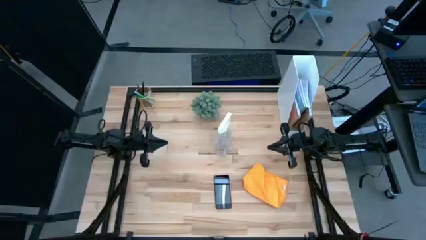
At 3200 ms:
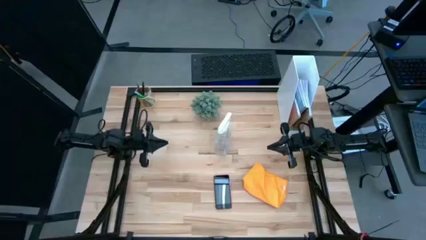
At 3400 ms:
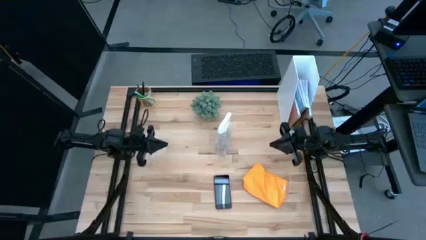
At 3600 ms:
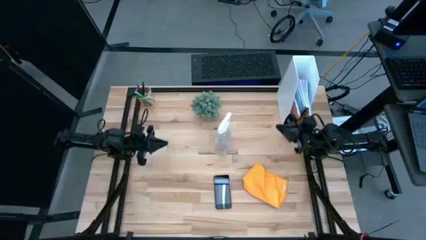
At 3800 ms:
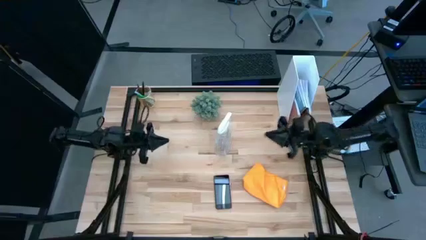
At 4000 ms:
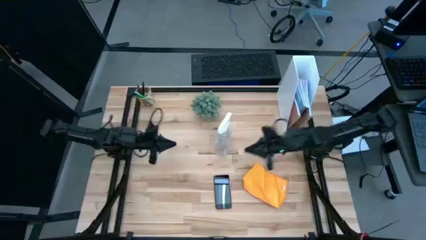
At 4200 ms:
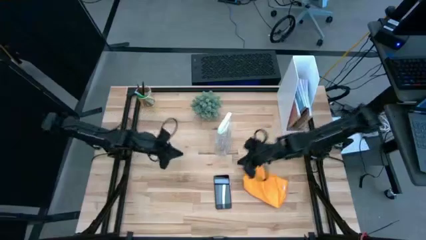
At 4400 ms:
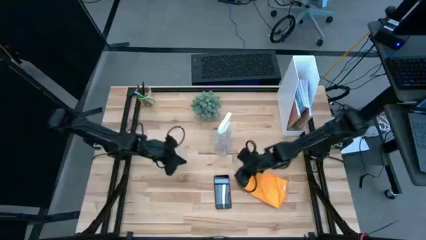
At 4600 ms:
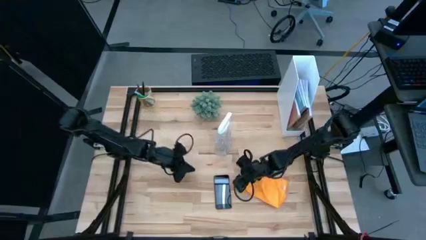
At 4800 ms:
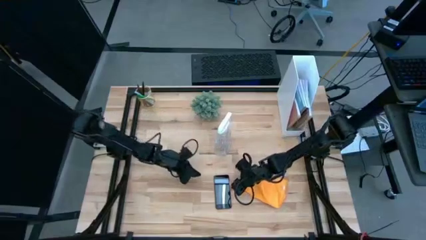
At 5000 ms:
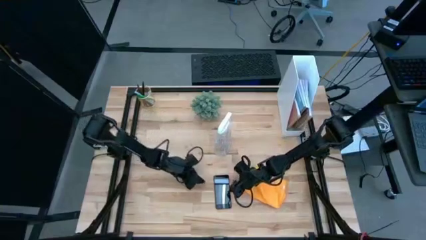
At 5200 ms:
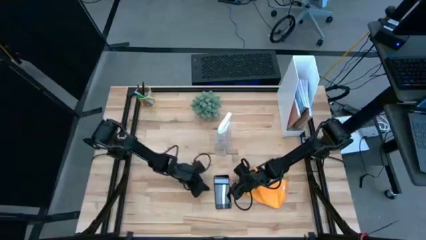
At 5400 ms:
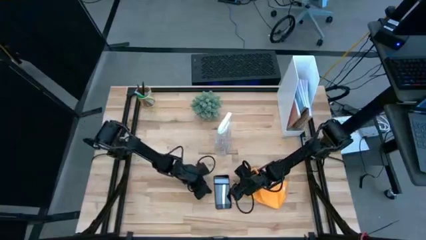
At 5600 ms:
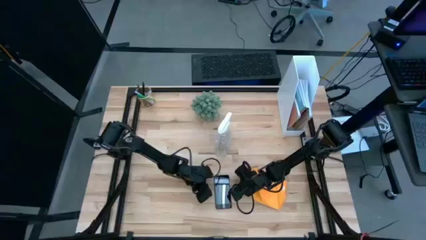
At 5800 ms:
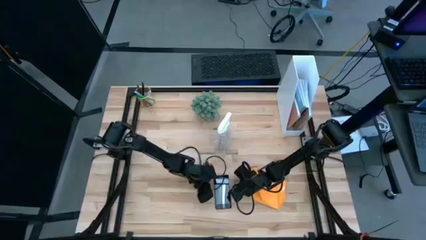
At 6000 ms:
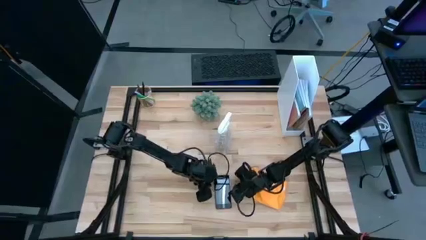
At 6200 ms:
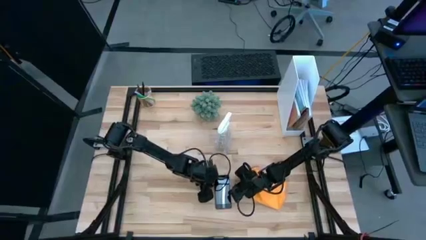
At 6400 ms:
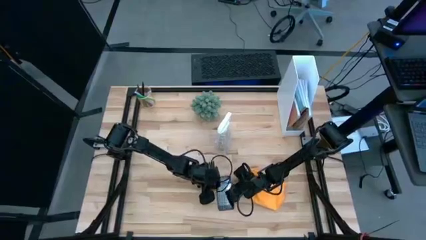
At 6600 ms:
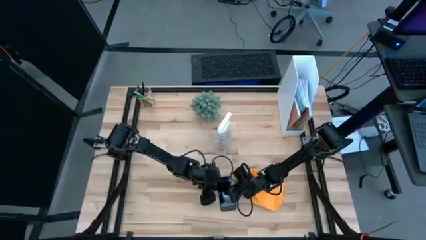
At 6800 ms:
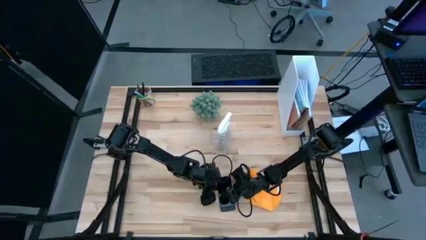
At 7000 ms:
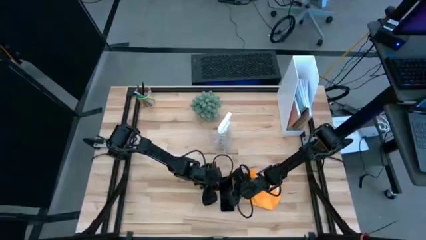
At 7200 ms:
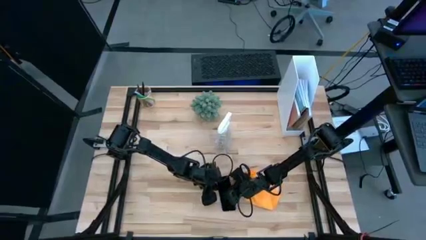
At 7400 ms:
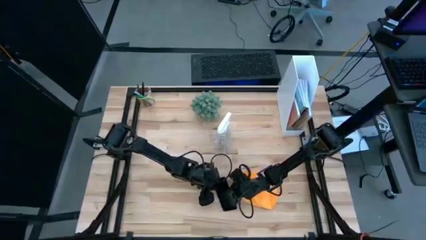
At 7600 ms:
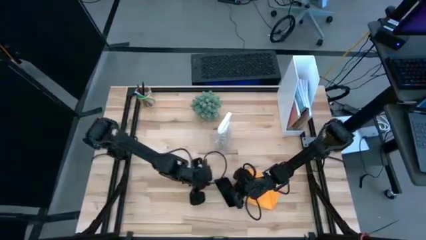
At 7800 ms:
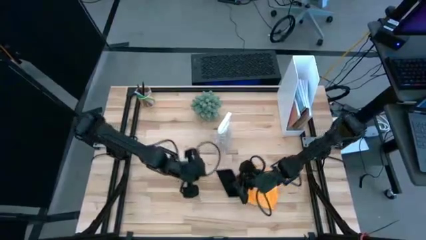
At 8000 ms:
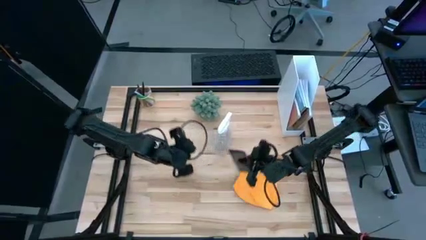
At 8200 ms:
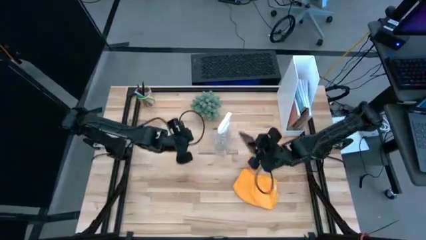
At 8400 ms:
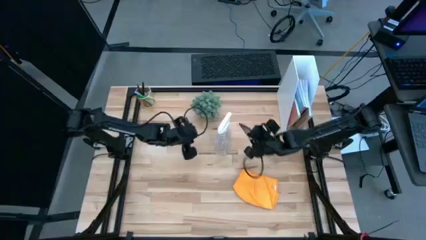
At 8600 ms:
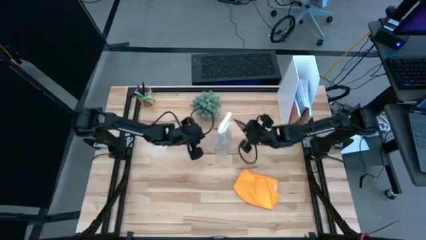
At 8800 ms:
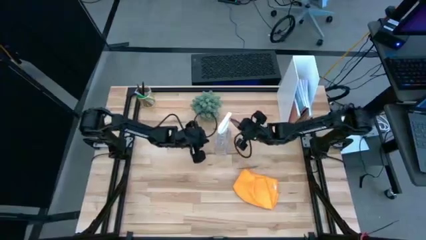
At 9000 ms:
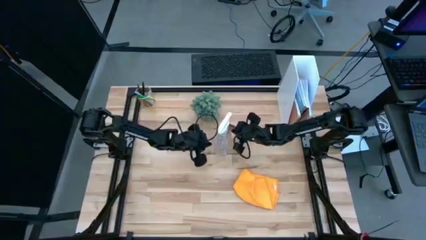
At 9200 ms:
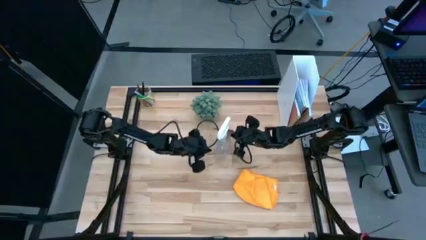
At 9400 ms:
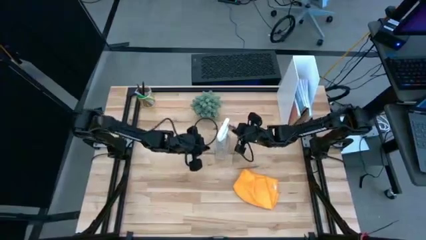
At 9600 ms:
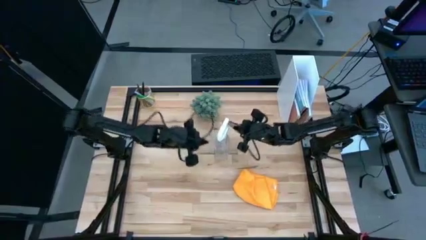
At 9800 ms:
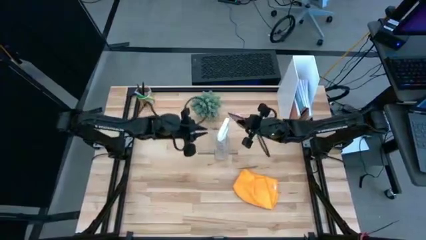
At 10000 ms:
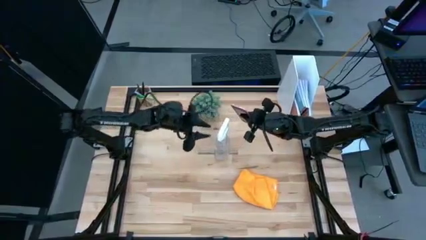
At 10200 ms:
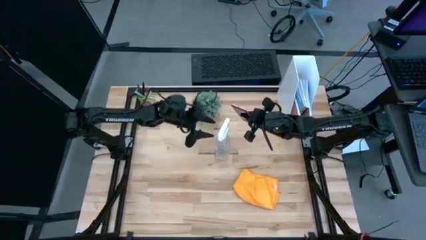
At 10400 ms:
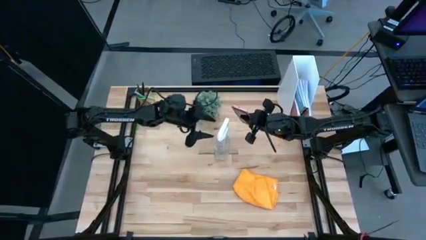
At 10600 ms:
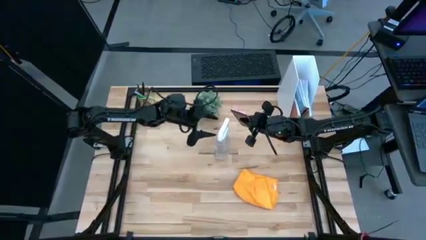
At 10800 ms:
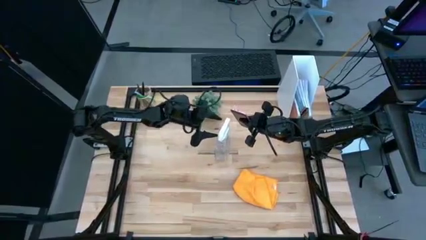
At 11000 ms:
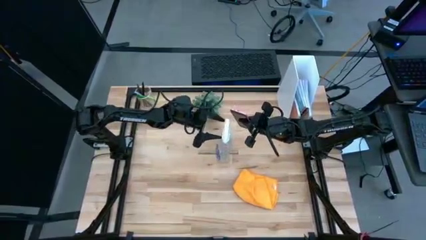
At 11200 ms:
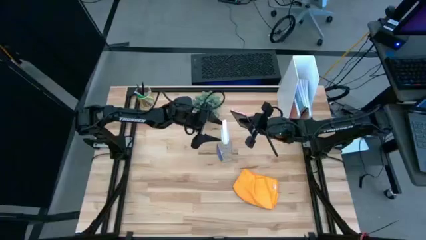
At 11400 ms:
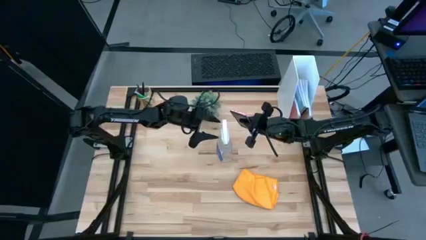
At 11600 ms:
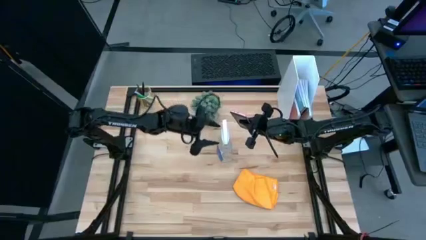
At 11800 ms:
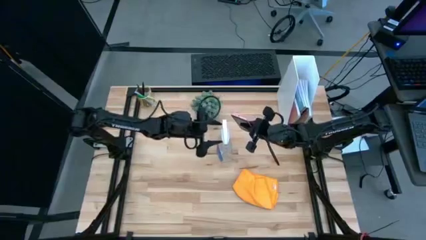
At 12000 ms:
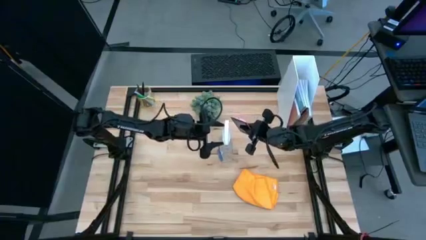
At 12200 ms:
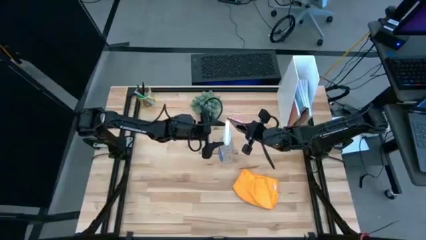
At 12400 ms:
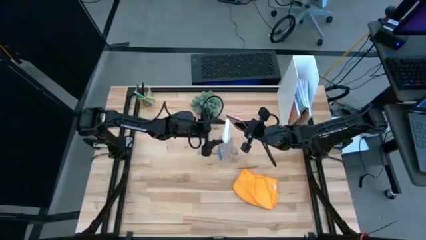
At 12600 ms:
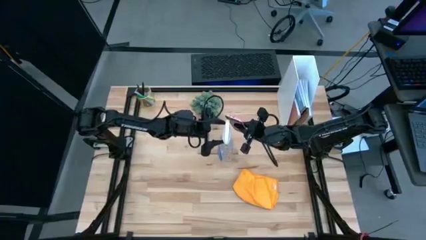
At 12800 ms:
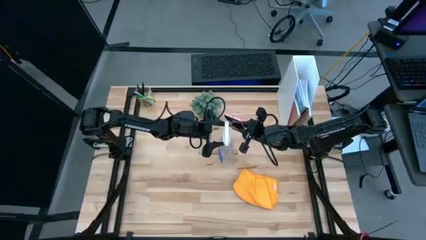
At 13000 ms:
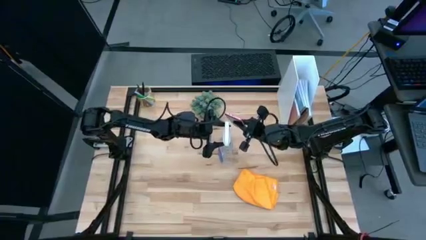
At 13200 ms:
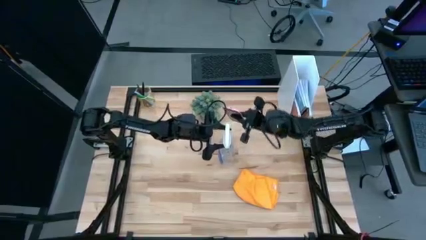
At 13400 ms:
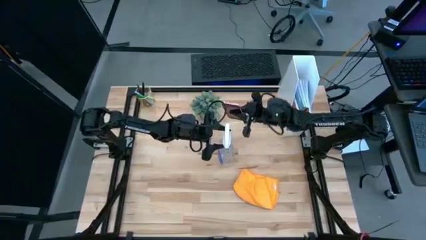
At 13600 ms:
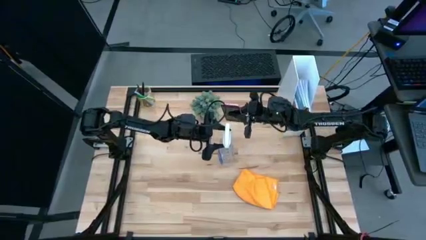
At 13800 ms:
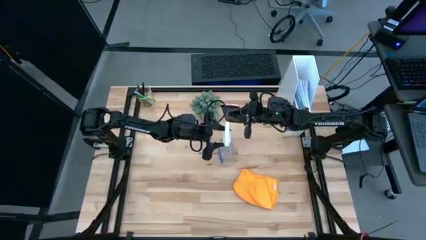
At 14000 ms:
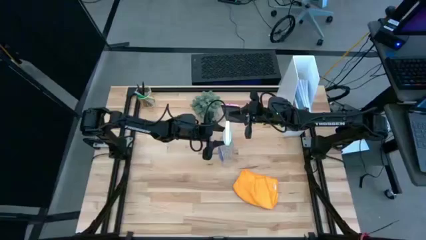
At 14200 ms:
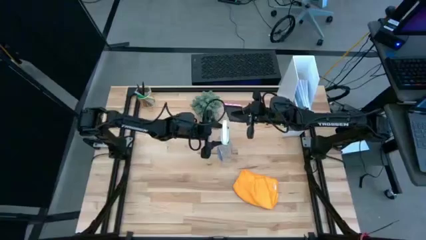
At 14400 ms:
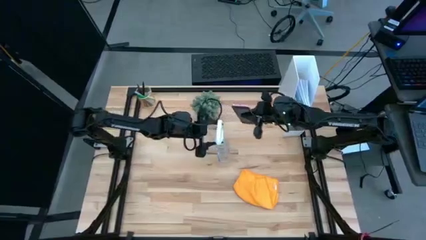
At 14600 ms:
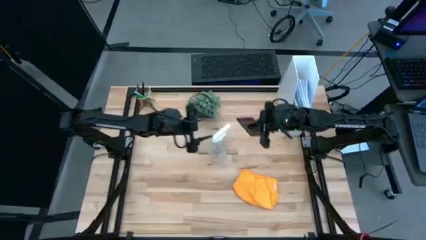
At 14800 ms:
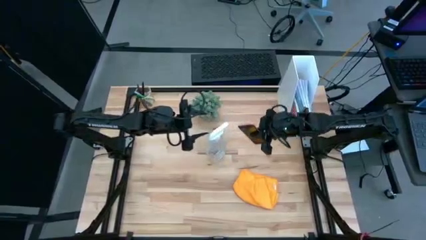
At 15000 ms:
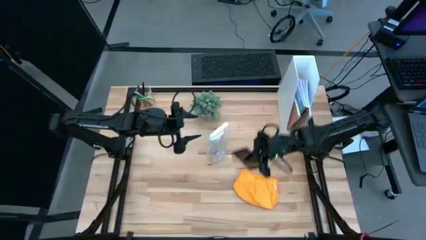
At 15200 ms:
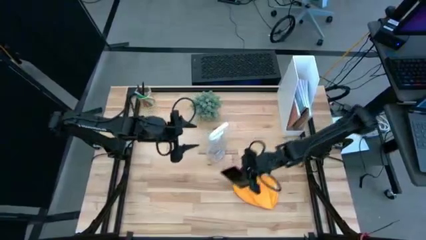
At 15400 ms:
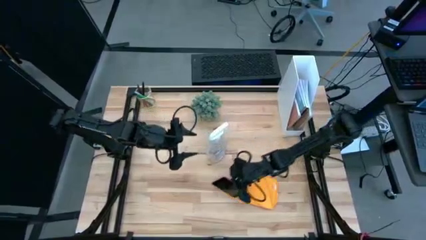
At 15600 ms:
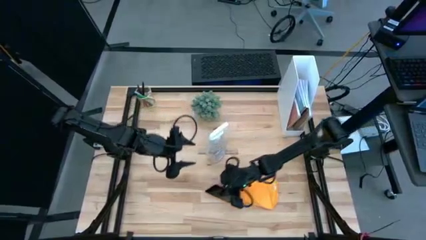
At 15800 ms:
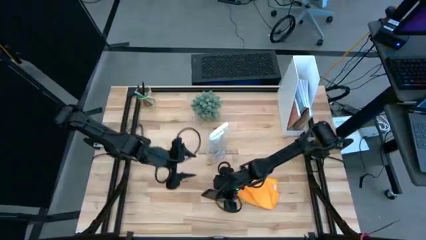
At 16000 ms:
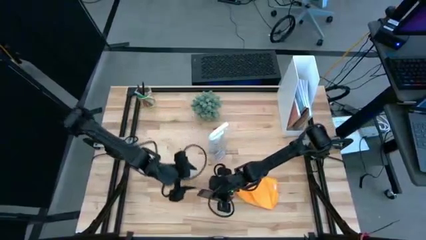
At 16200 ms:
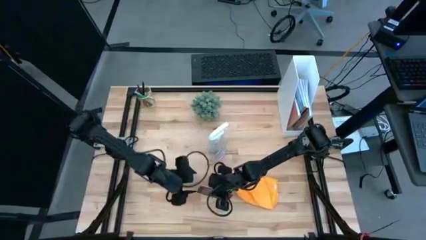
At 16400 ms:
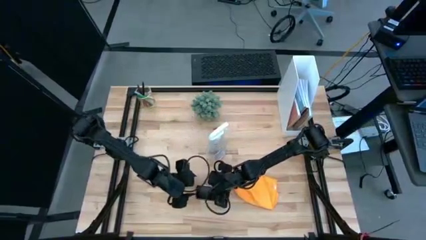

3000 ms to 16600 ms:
Task: Apply microfiber cloth
Spray the front of the pink phone with the white spray bottle
